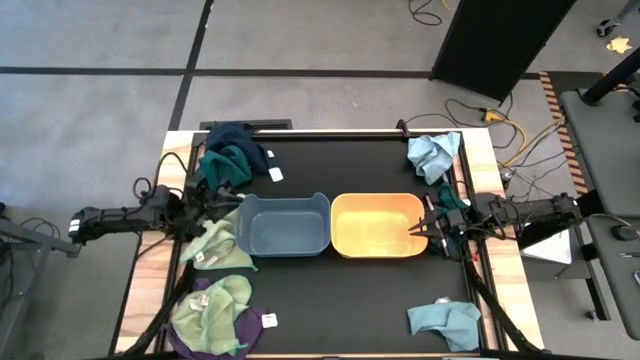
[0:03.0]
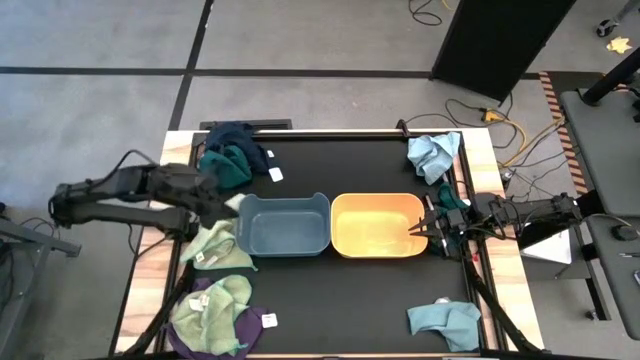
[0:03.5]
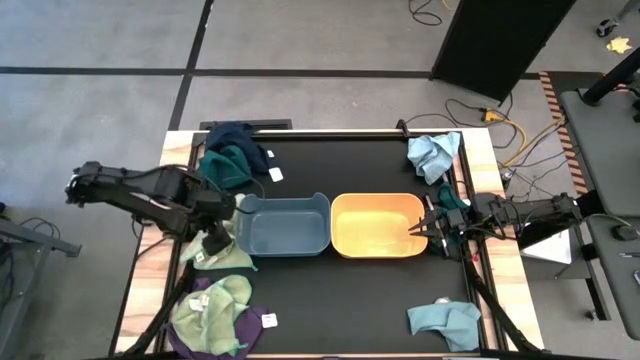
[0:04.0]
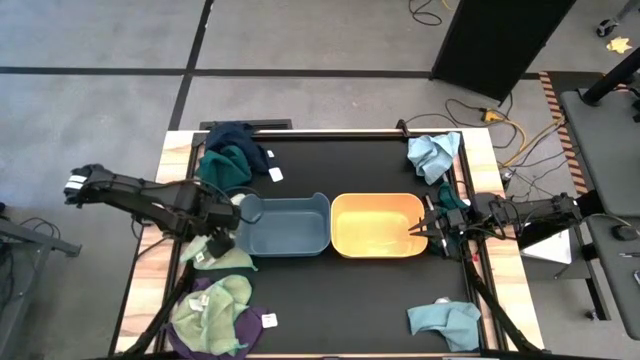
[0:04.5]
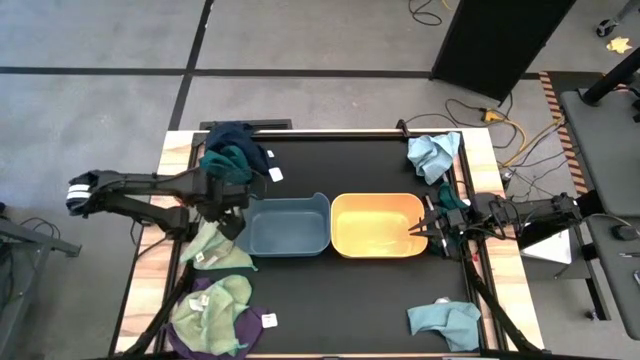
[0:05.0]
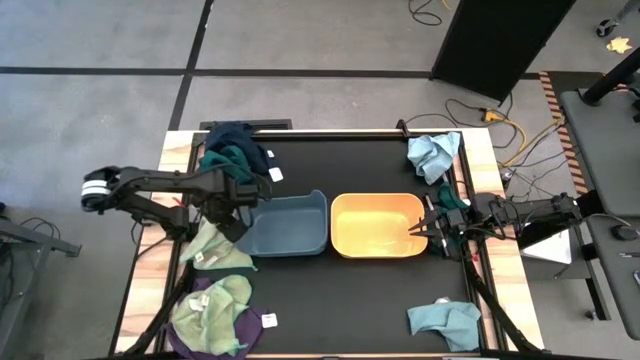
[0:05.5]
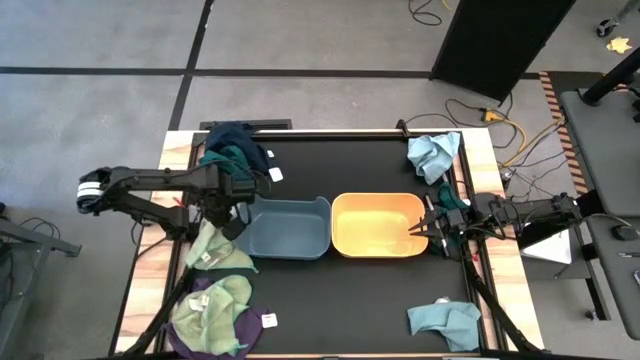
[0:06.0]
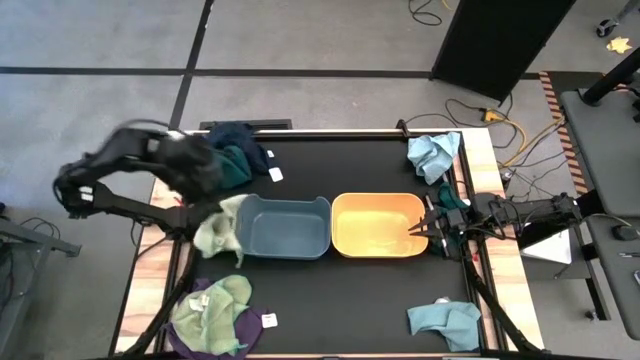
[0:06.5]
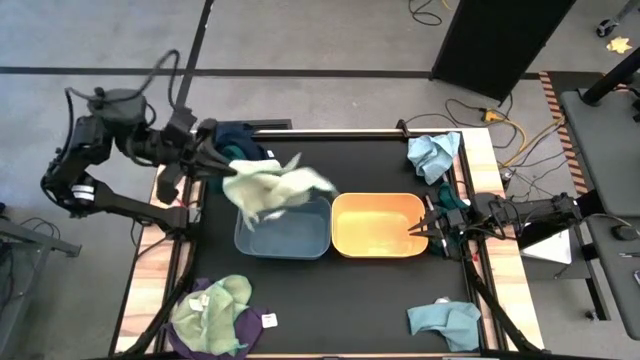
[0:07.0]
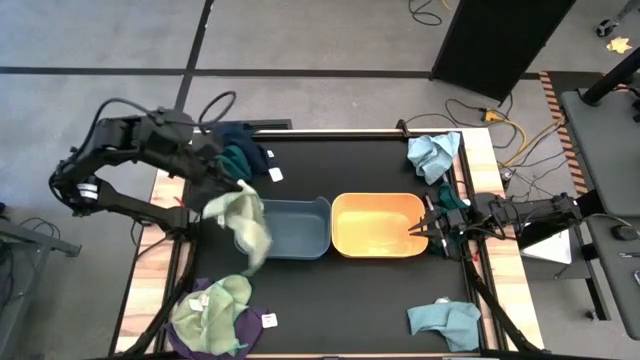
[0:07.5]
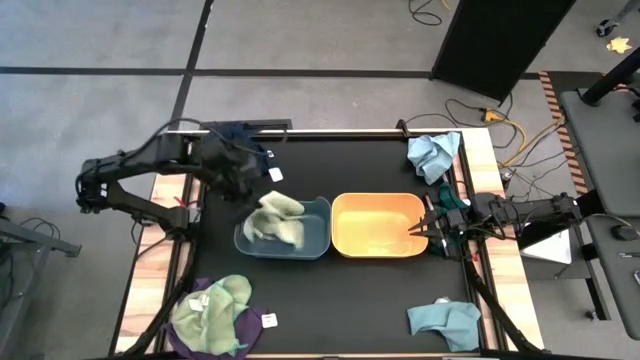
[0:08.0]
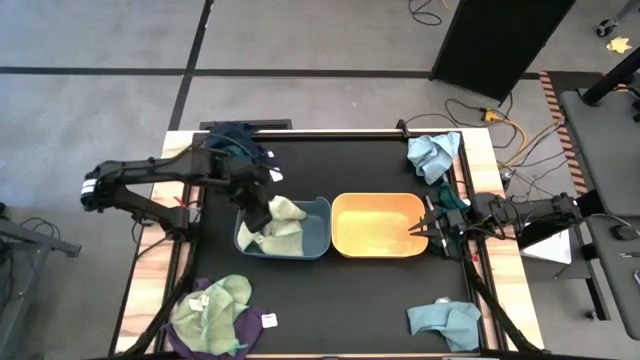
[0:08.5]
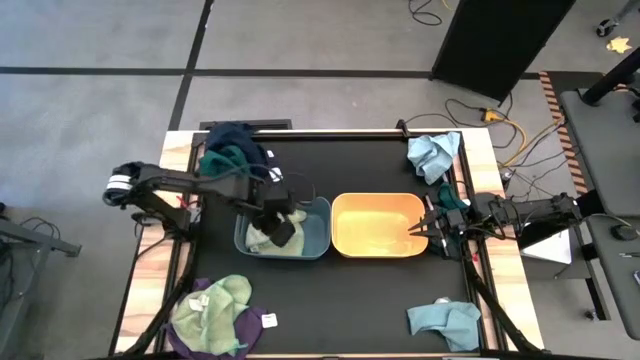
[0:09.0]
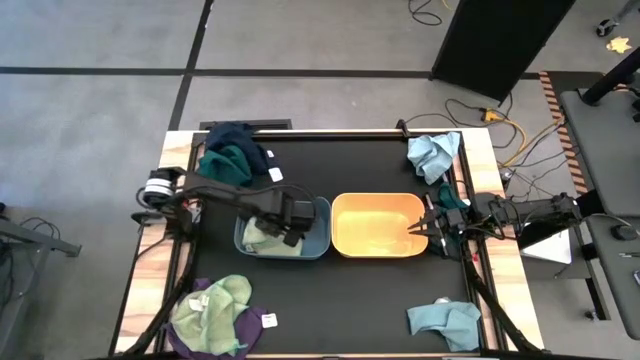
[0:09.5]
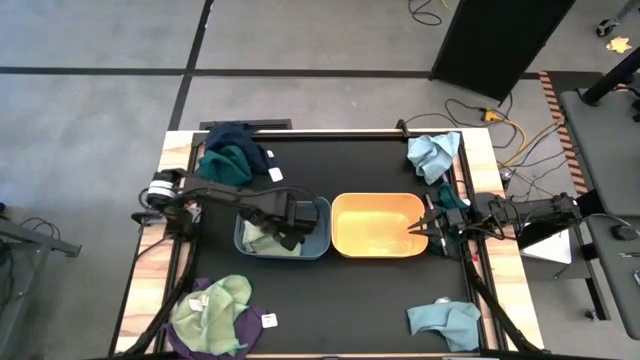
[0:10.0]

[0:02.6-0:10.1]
Task: Sort towels by color in basket
Put the green towel into the blue bin

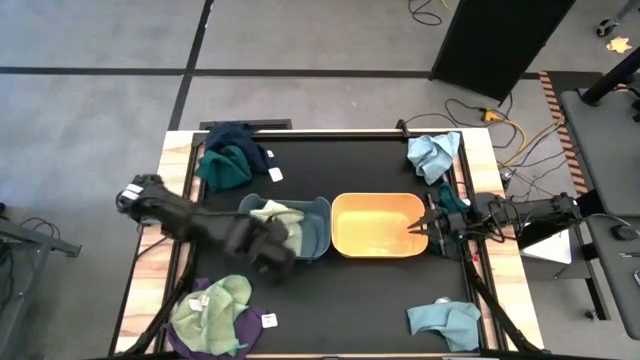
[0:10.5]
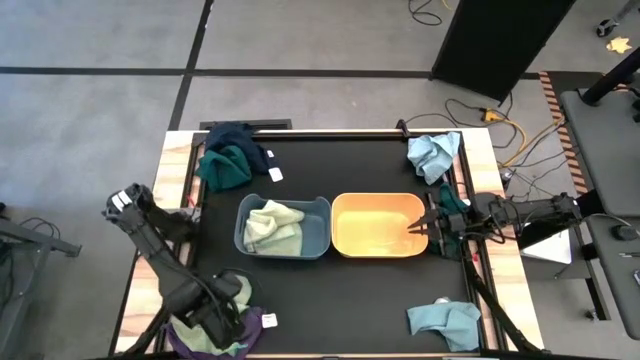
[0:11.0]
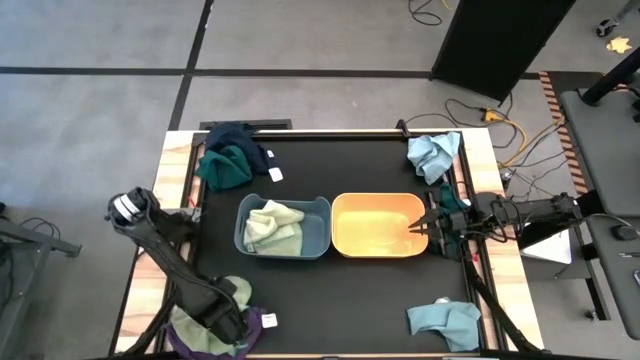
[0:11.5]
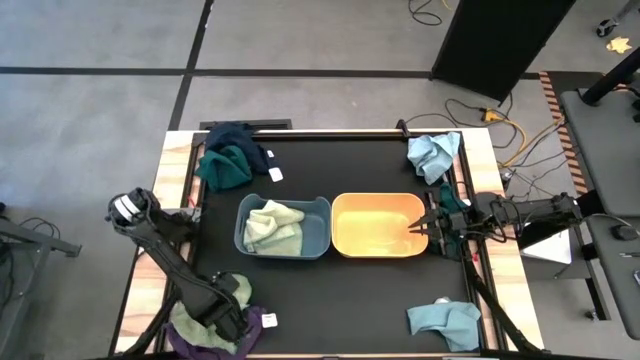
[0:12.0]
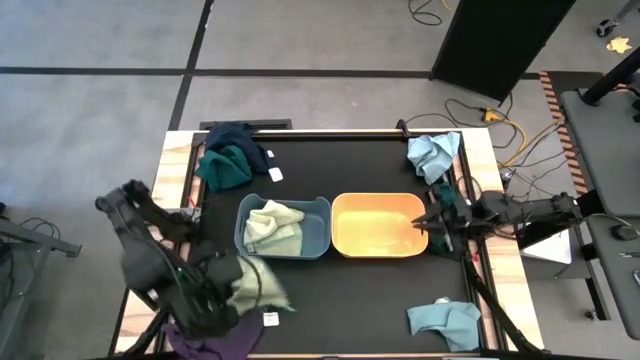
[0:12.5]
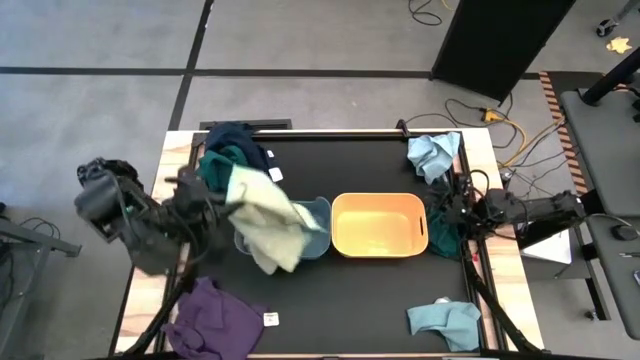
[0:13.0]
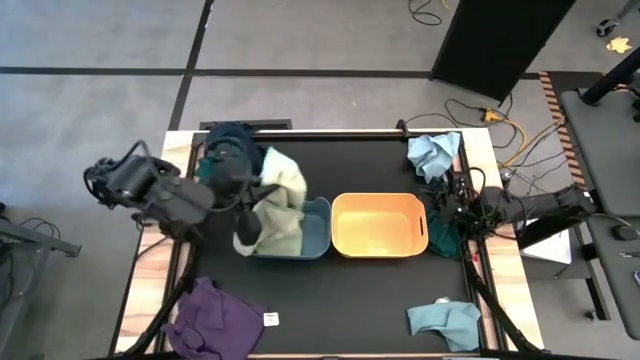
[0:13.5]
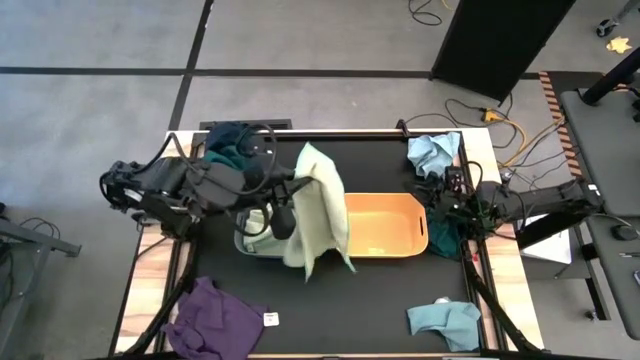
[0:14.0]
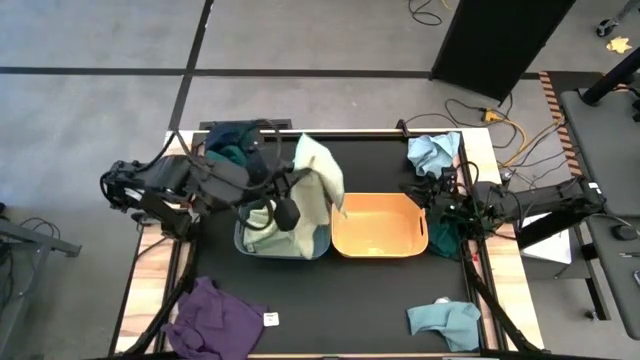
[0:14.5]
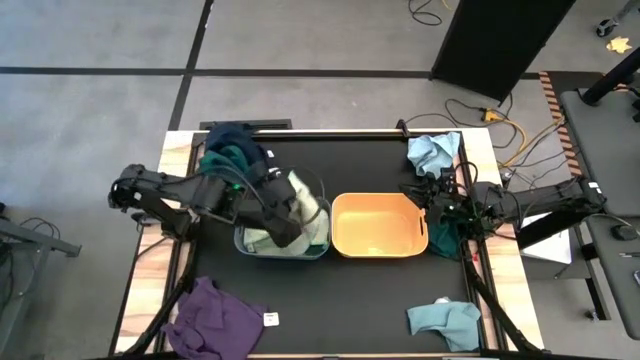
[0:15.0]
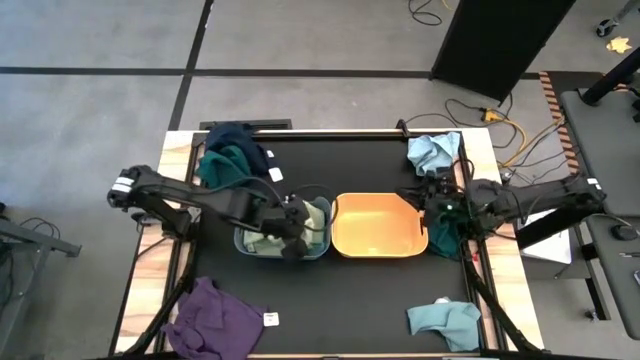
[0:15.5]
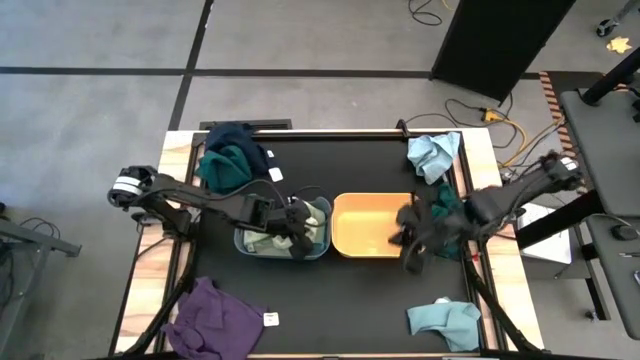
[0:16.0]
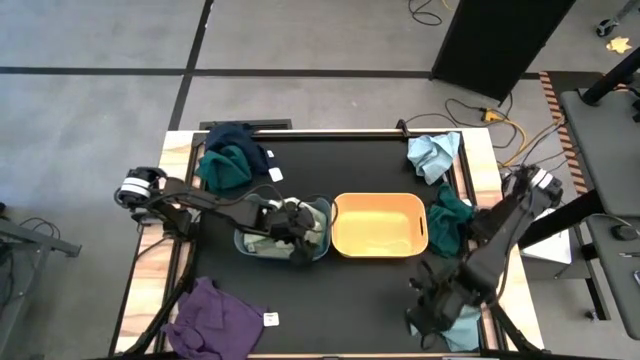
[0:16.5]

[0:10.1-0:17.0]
Put the green towel into the blue bin

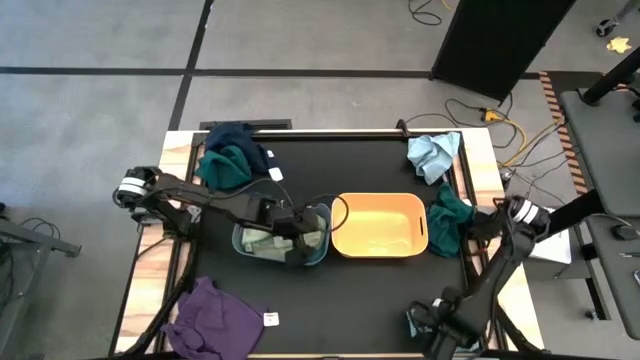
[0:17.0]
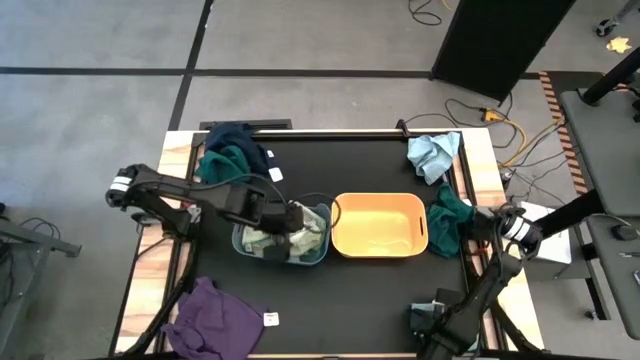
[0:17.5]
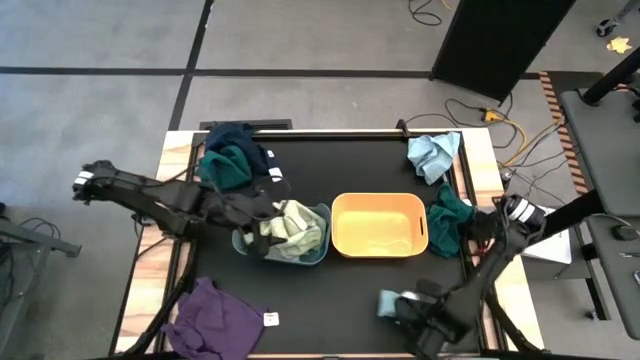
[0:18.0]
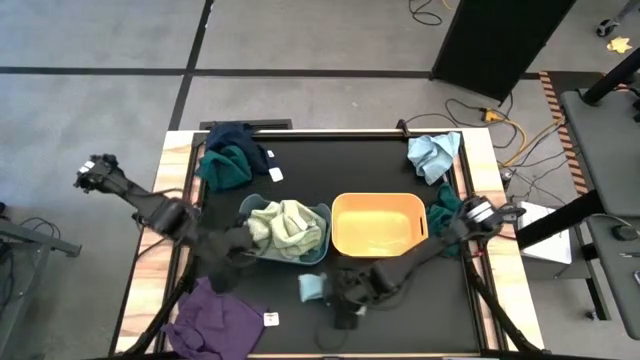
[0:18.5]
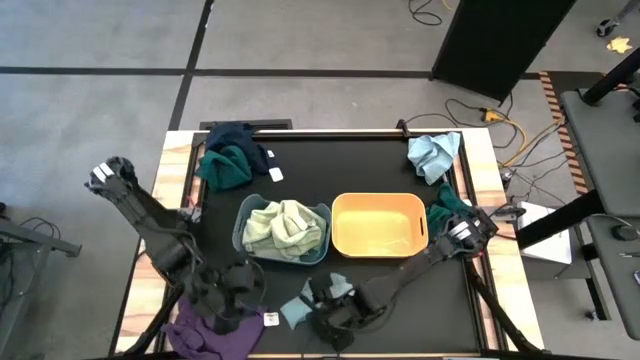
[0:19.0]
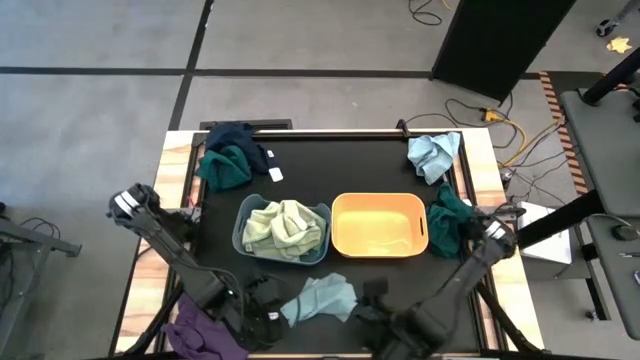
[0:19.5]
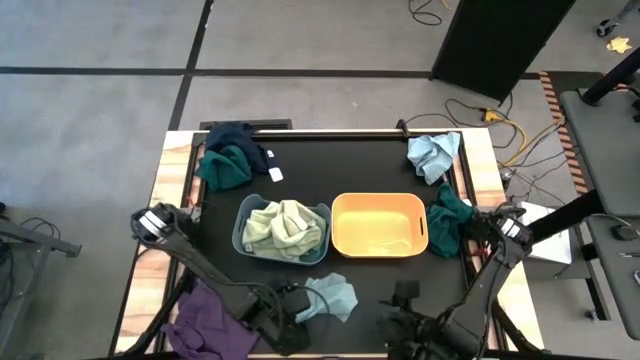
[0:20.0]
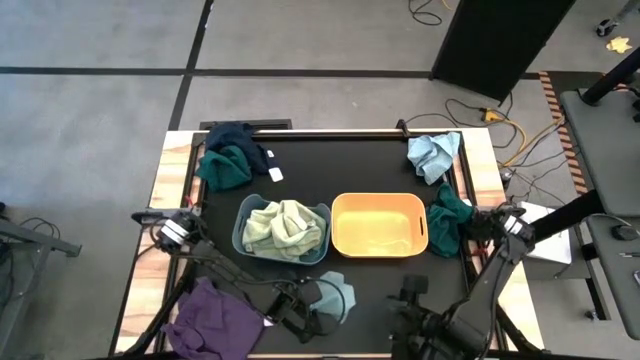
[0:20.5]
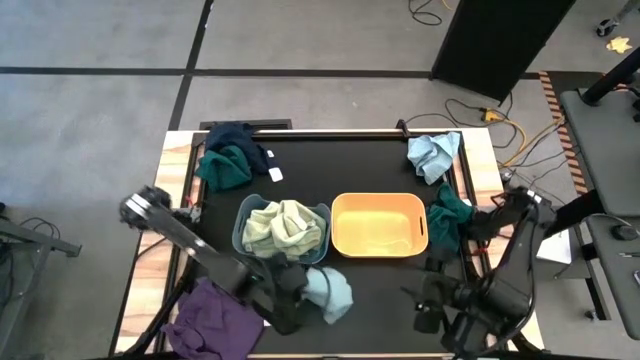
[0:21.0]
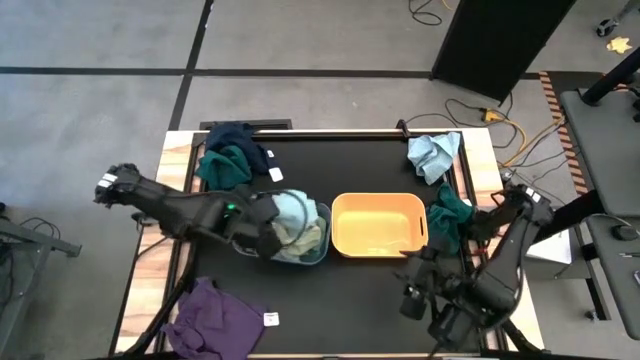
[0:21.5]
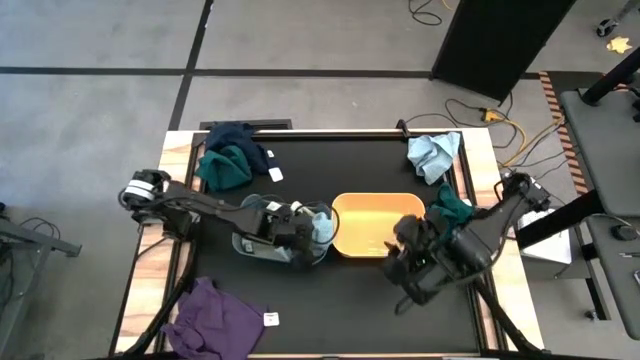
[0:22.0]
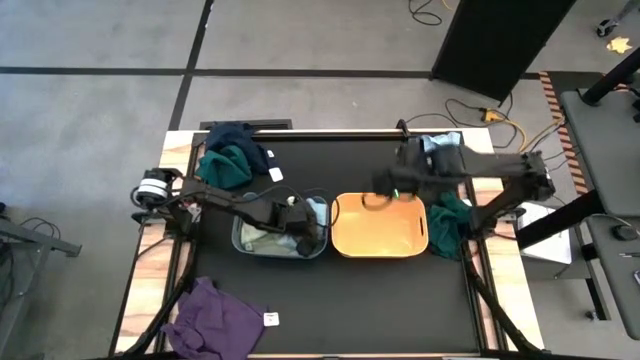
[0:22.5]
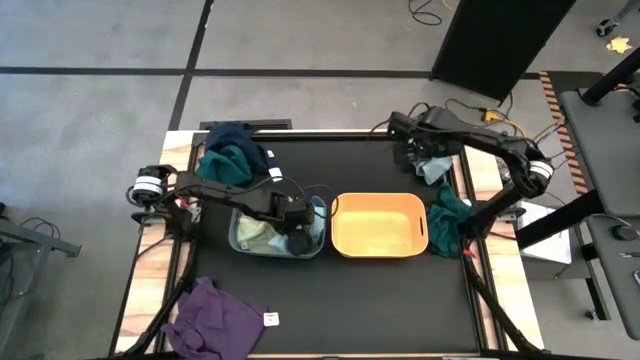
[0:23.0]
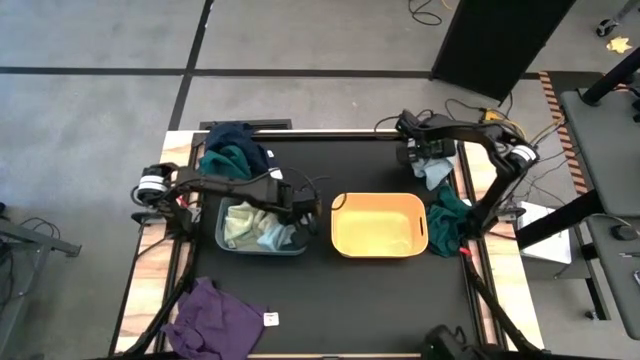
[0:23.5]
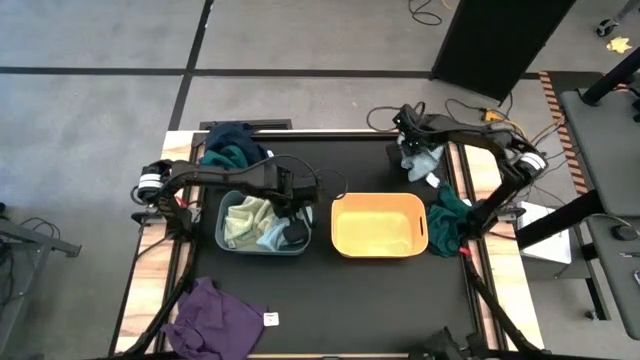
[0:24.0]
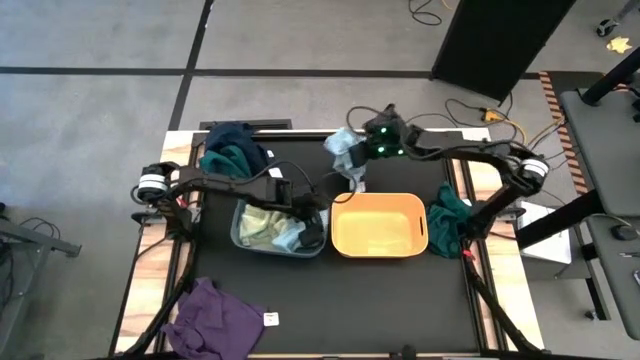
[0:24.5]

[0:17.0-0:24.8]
Put the light blue towel into the blue bin
